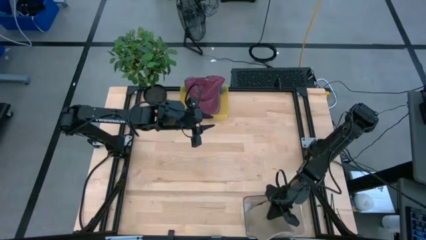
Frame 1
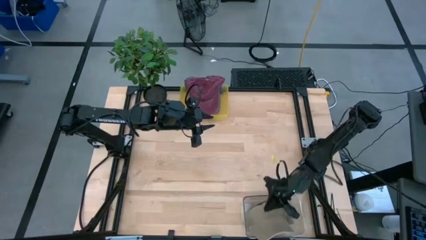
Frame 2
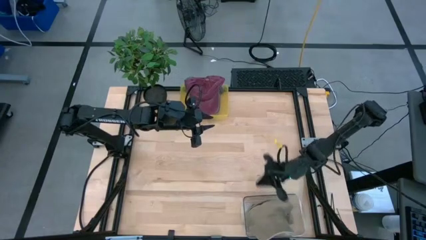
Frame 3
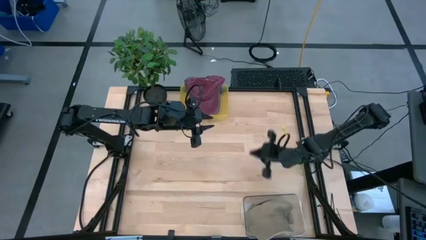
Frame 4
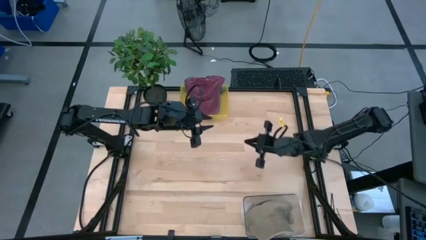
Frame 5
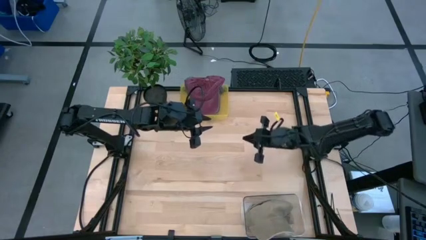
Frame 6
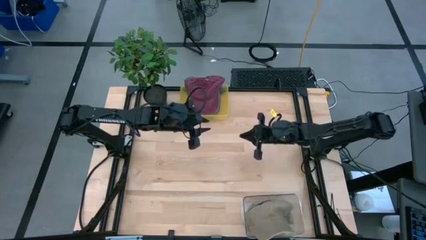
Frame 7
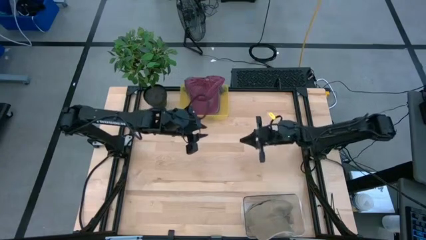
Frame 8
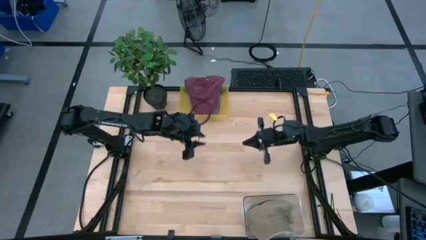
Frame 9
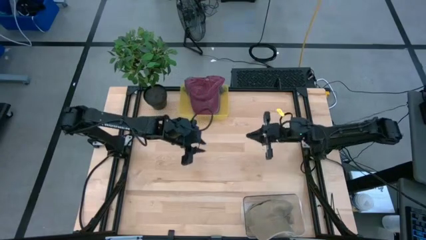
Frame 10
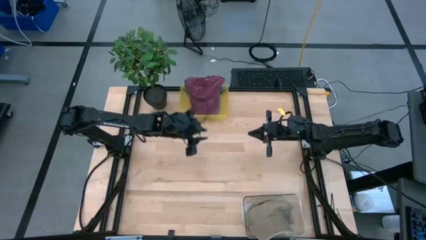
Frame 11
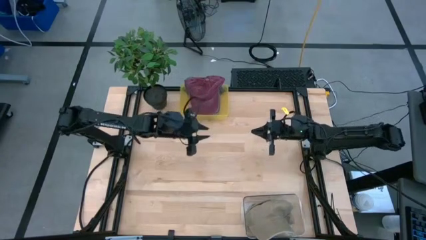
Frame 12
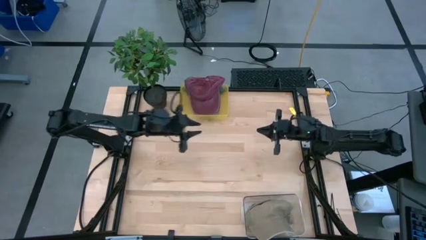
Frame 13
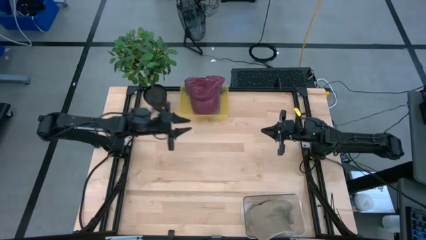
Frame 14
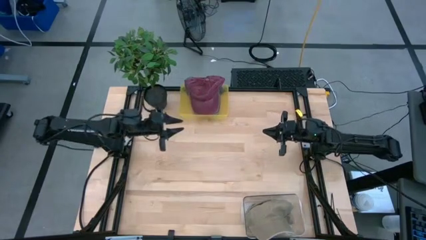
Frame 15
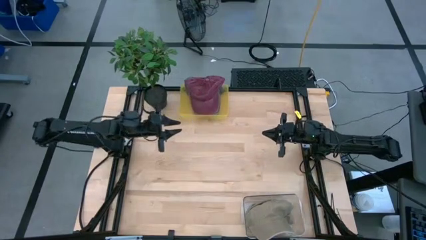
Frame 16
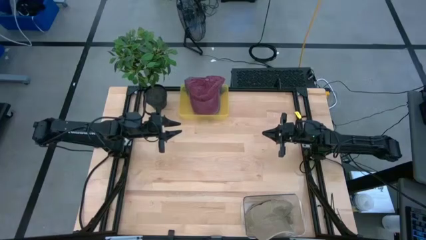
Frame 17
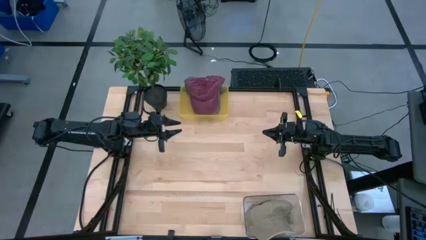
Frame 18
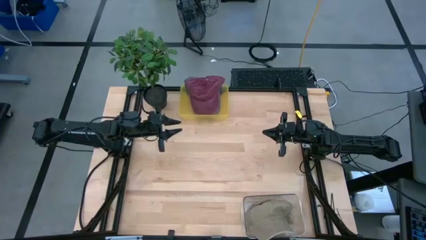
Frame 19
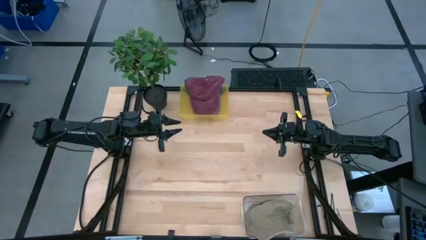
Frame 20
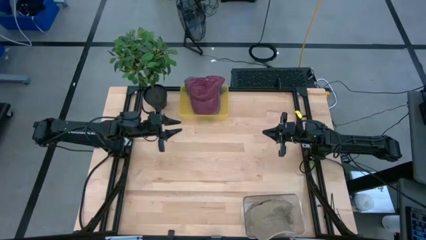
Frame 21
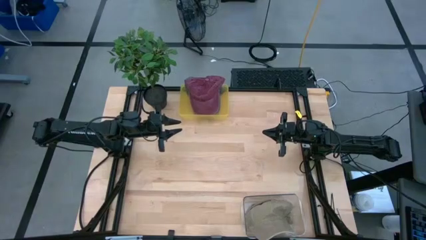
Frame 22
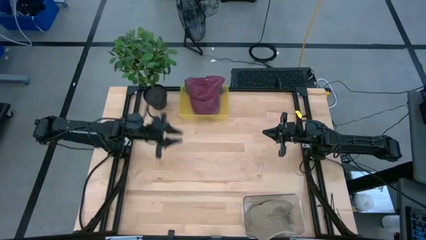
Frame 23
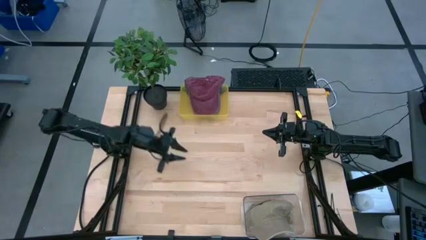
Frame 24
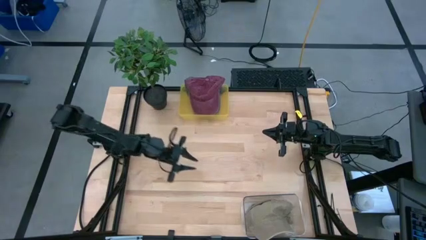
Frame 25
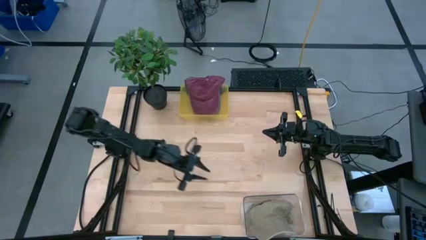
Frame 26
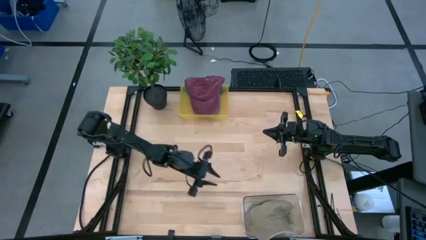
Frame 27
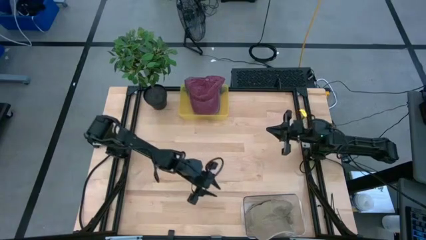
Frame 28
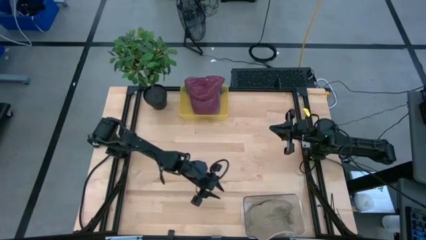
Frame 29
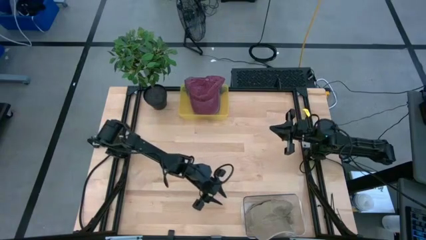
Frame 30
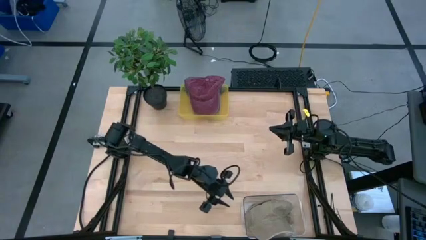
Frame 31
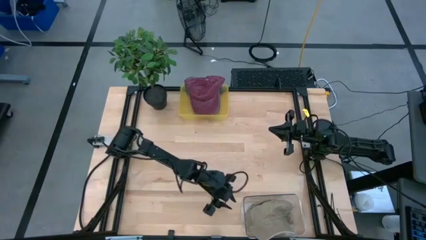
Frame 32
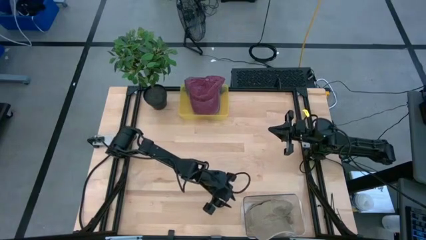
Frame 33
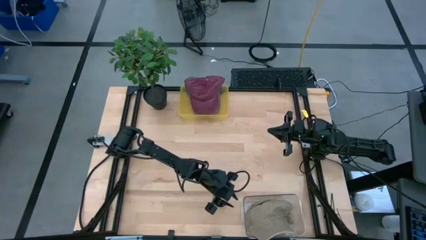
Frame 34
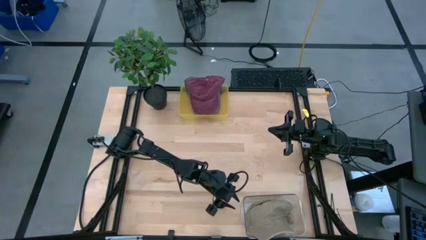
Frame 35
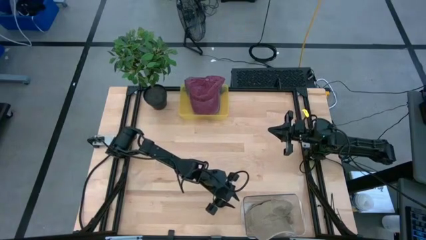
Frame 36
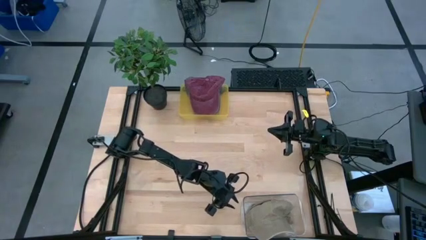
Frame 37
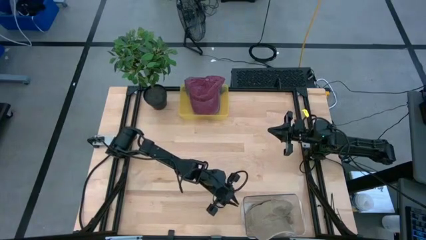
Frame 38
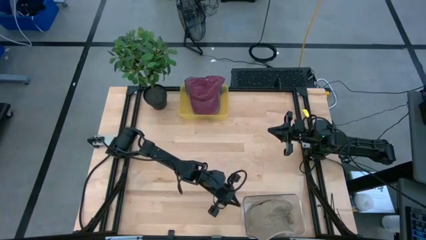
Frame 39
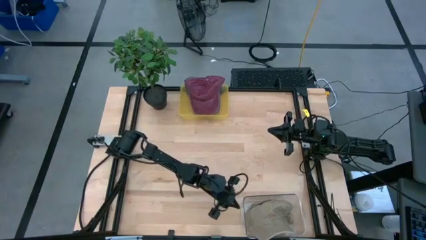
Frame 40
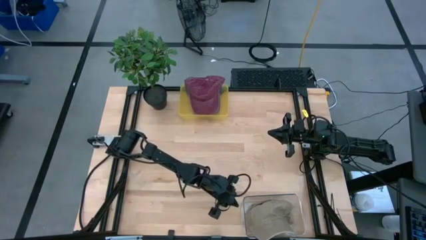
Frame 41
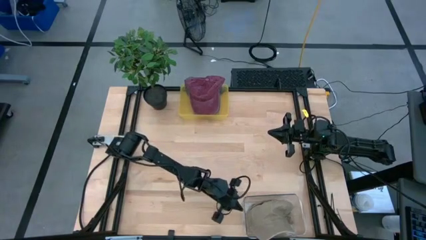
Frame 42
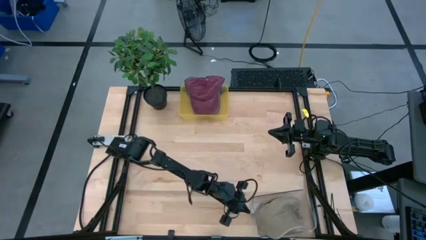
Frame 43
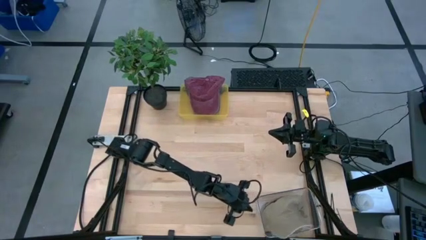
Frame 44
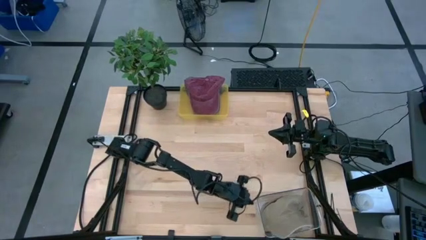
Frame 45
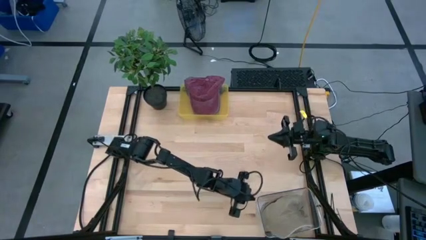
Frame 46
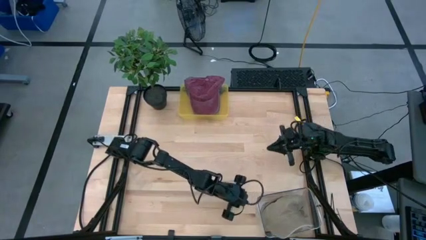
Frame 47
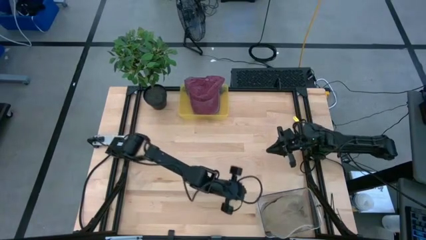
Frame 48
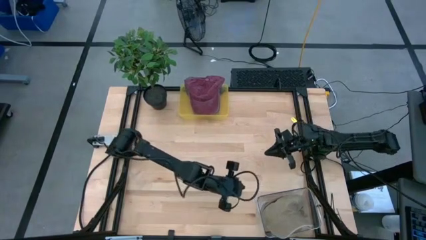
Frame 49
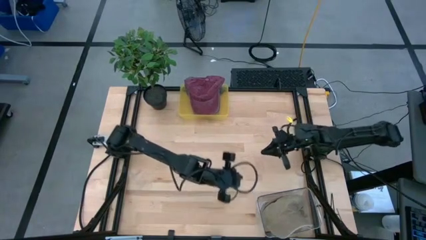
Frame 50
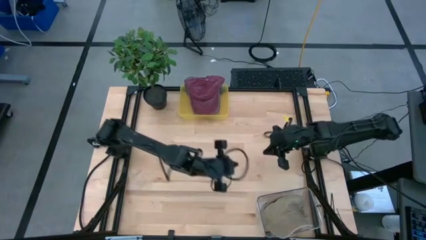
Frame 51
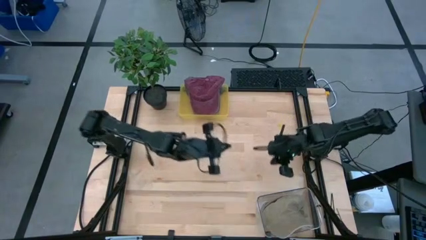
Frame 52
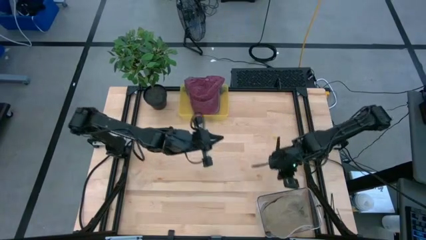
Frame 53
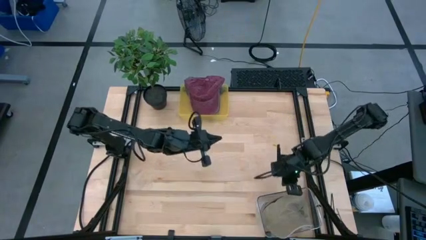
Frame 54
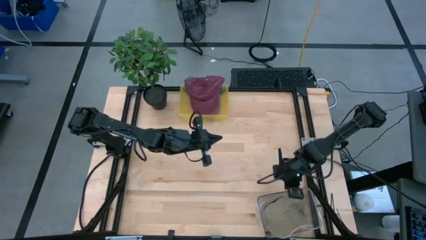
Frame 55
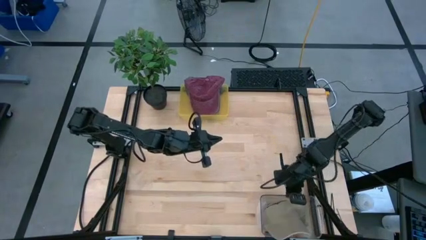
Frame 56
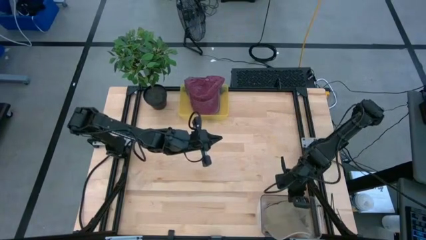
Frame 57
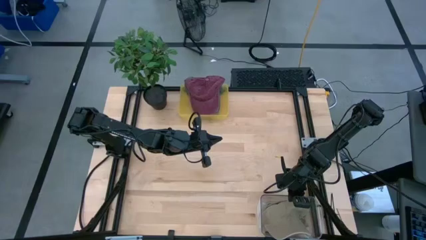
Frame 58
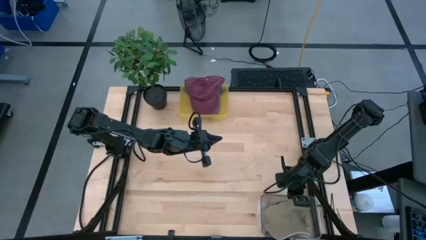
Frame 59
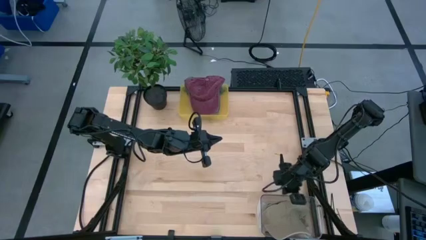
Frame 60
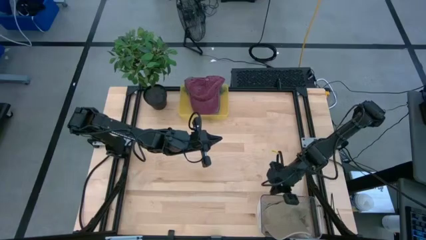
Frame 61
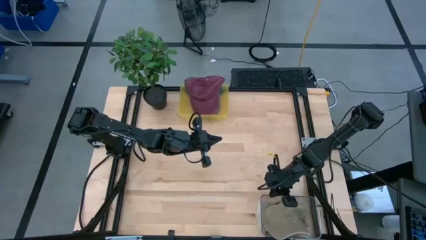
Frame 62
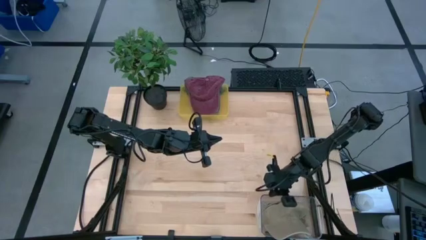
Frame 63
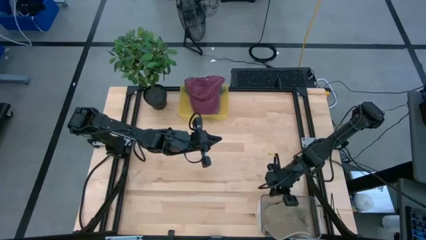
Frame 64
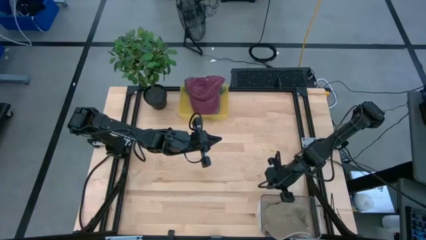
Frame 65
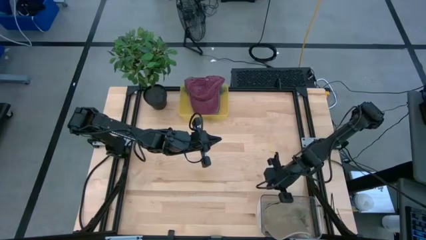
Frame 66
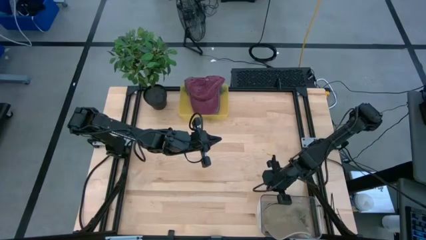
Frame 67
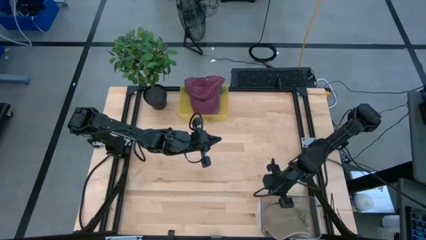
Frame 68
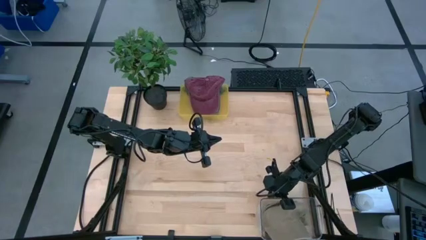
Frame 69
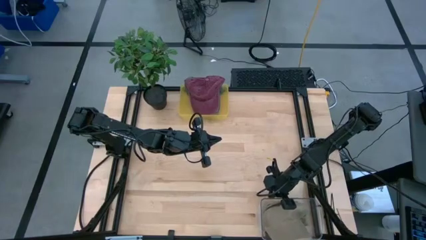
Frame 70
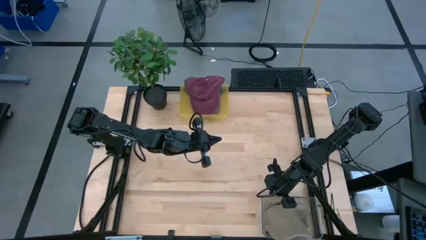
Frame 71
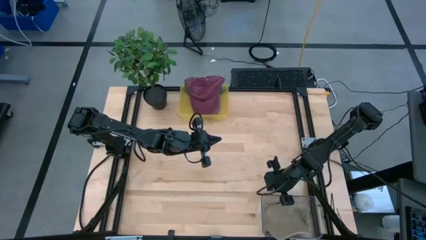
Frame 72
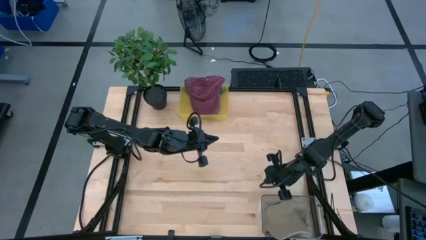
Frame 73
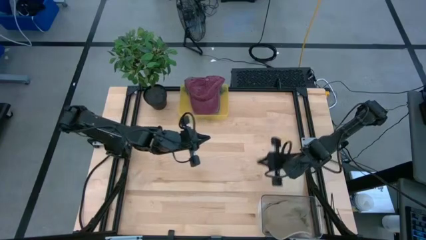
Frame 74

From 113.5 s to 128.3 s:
Task: Pick & Place hat
Adjust the transparent bin on the table
